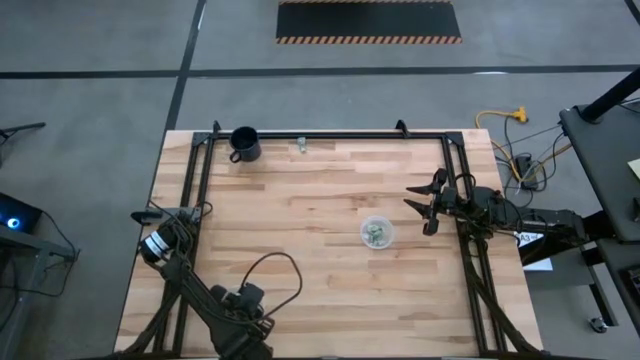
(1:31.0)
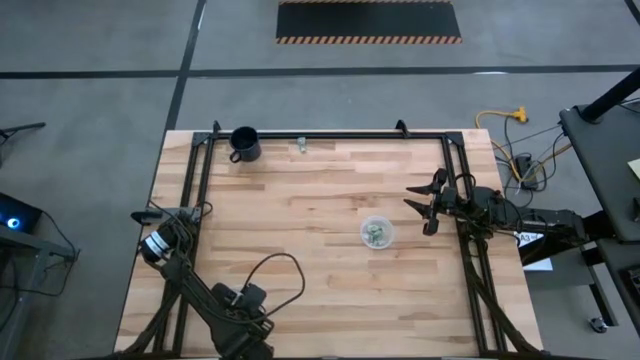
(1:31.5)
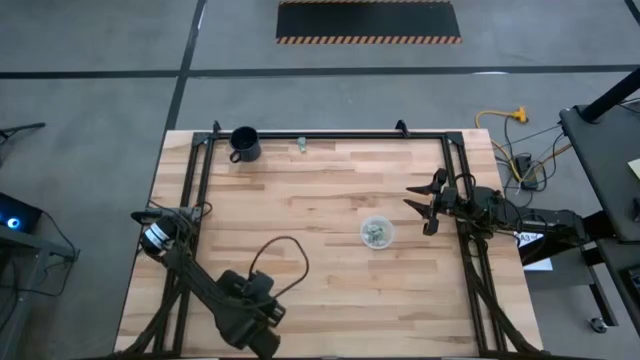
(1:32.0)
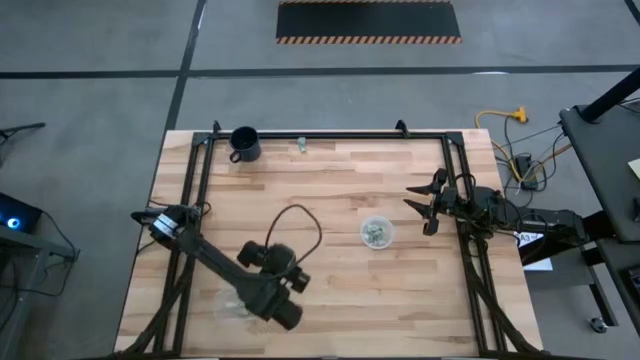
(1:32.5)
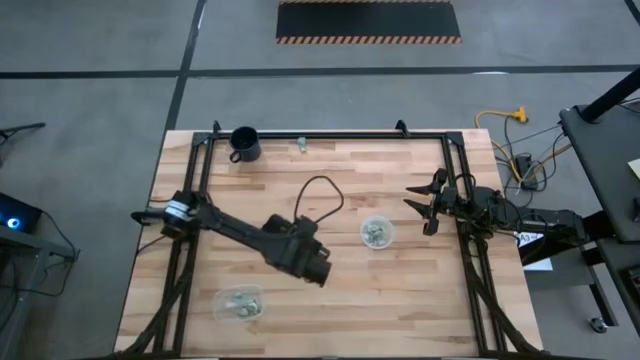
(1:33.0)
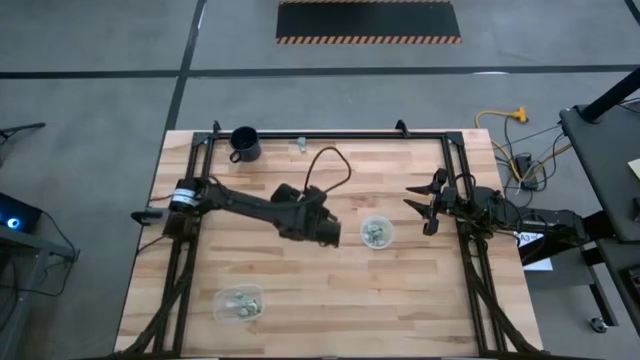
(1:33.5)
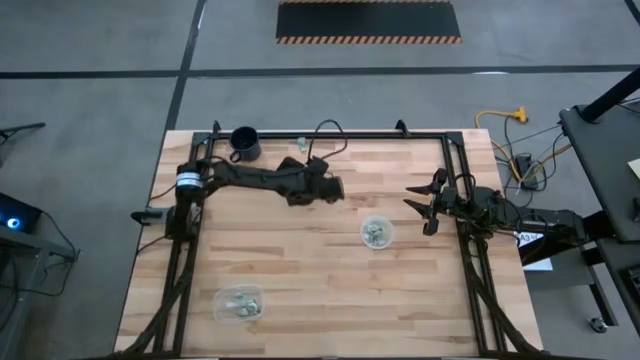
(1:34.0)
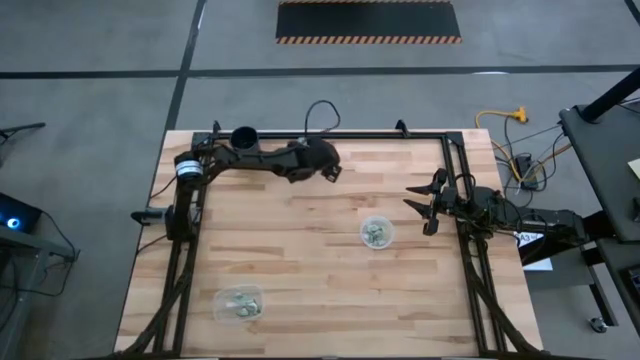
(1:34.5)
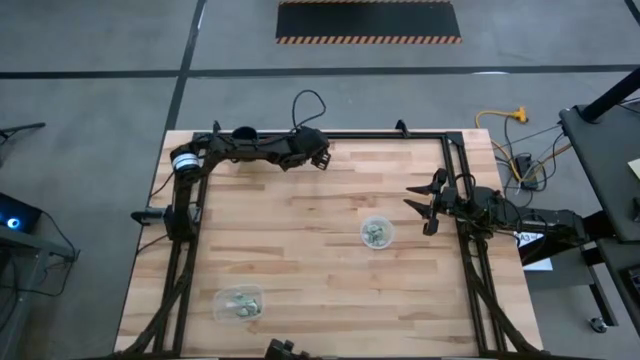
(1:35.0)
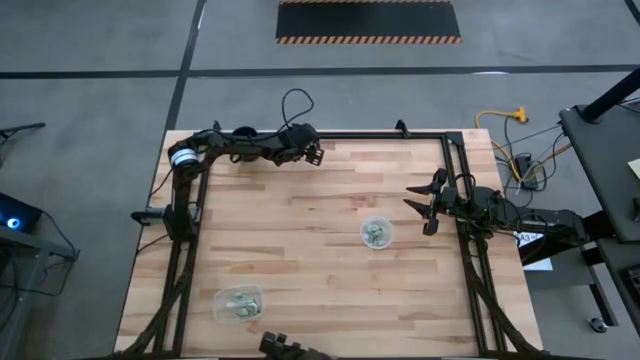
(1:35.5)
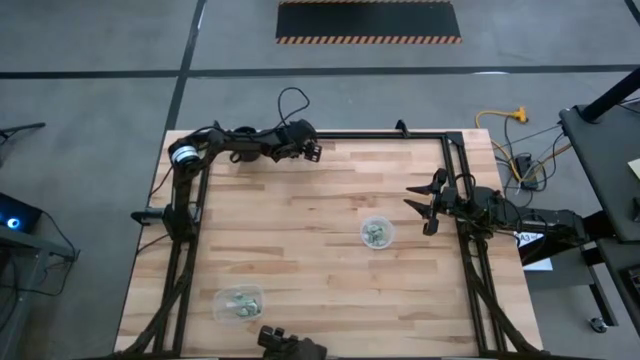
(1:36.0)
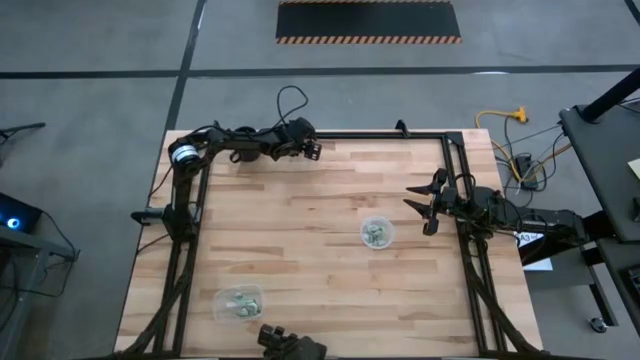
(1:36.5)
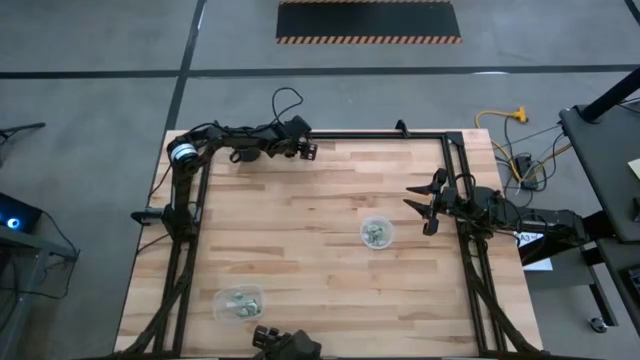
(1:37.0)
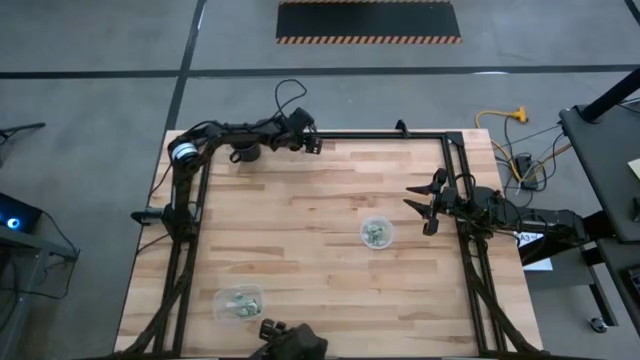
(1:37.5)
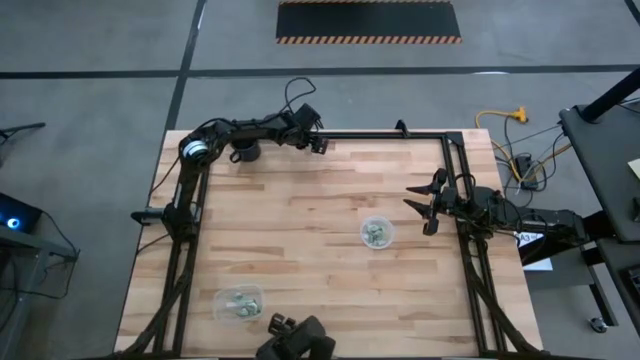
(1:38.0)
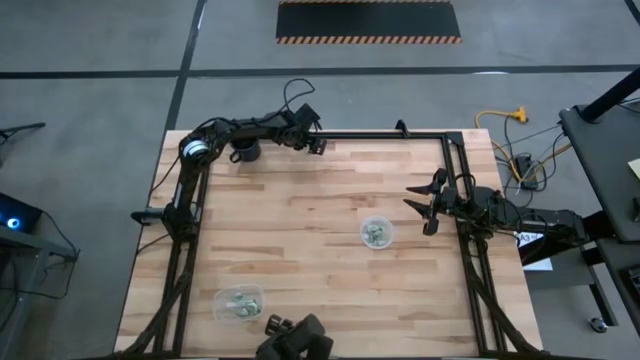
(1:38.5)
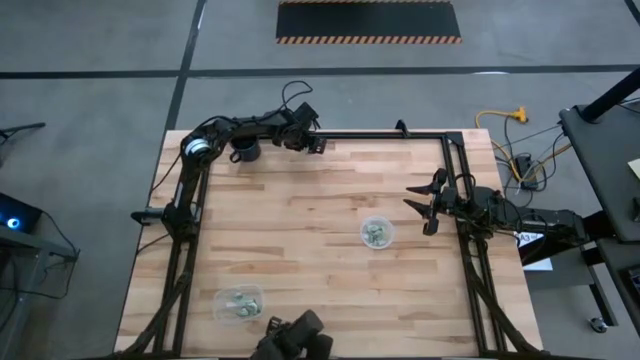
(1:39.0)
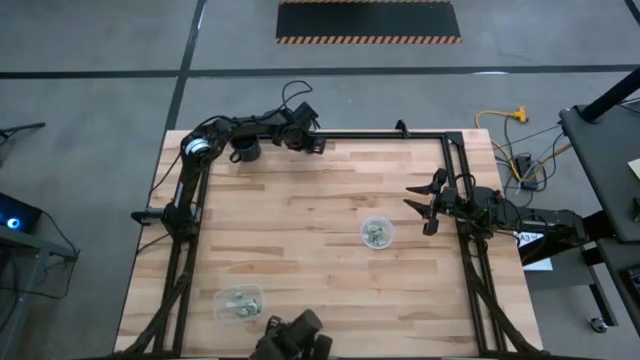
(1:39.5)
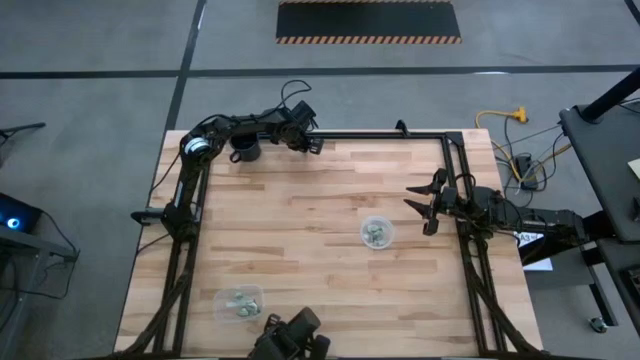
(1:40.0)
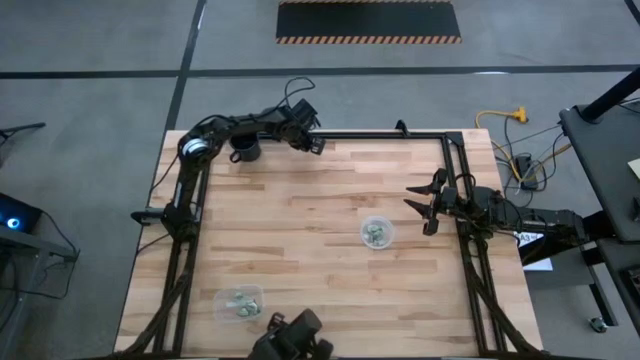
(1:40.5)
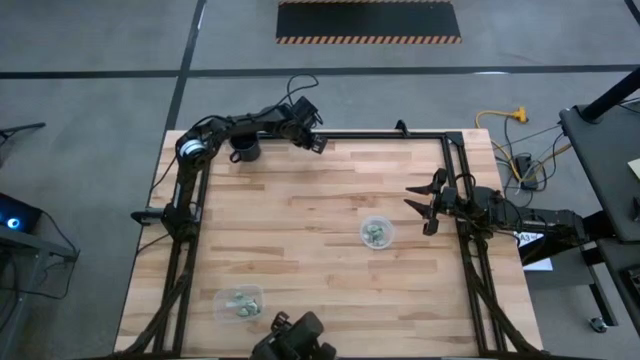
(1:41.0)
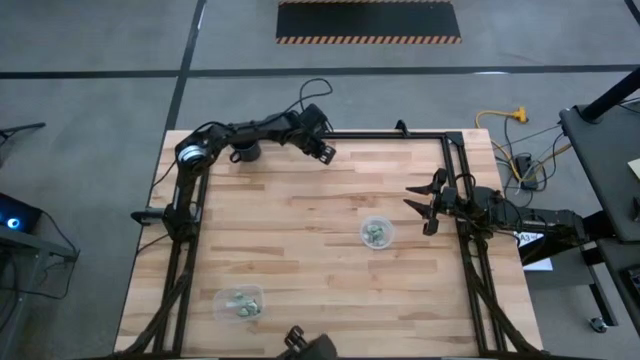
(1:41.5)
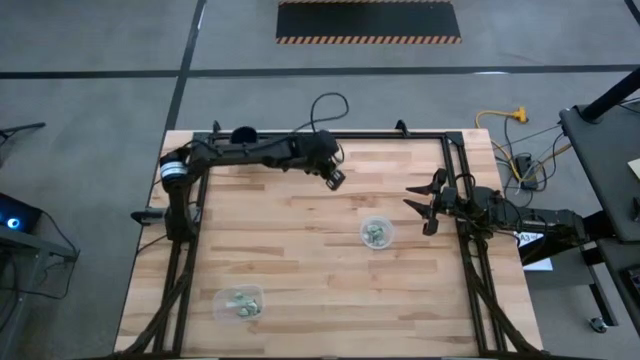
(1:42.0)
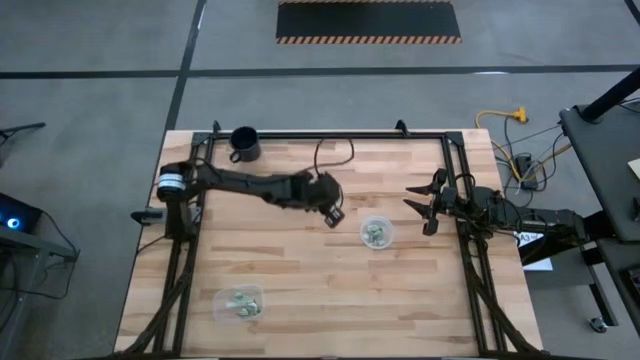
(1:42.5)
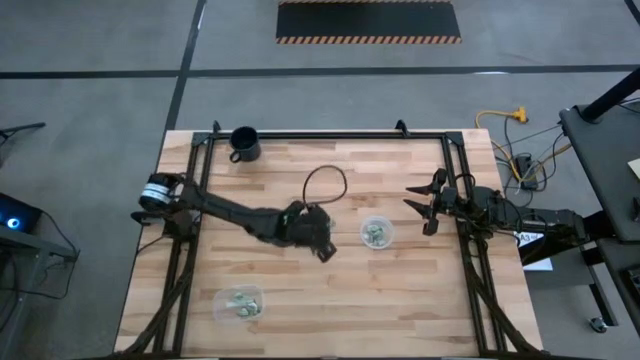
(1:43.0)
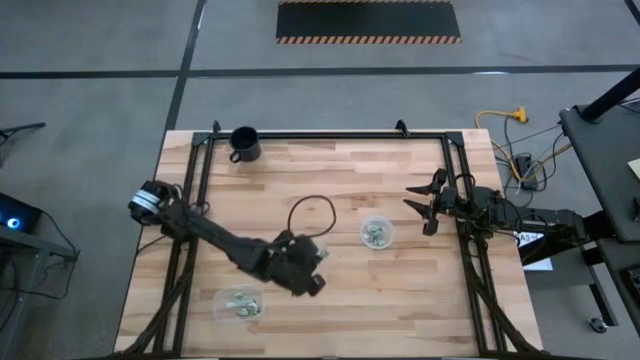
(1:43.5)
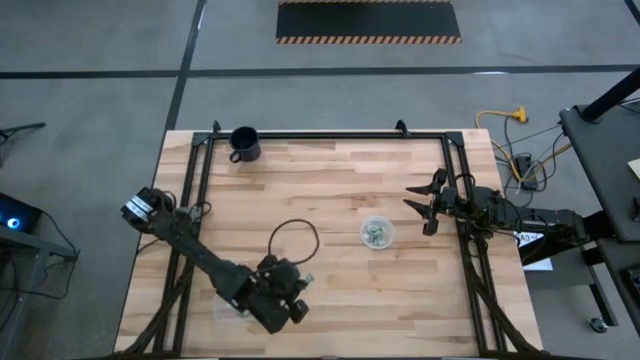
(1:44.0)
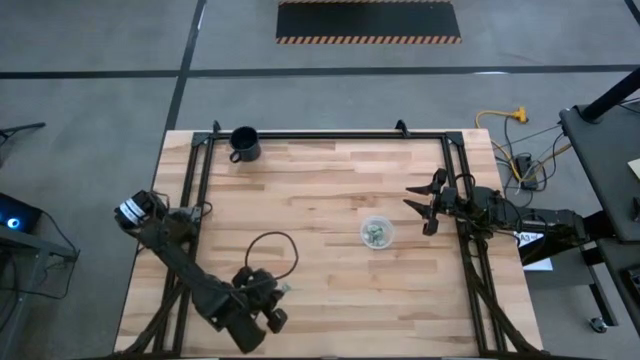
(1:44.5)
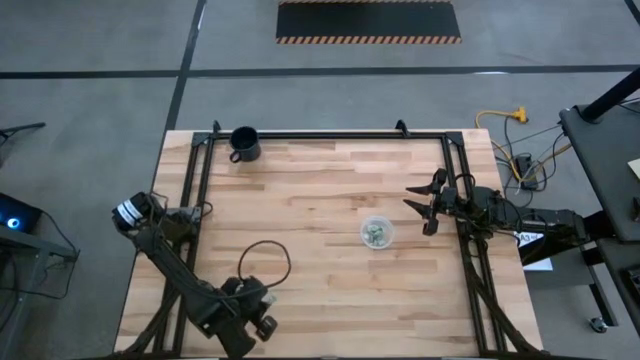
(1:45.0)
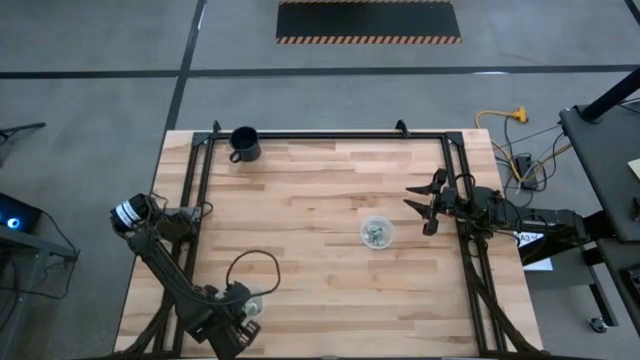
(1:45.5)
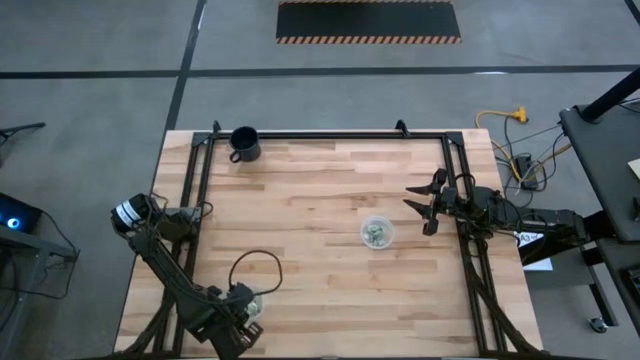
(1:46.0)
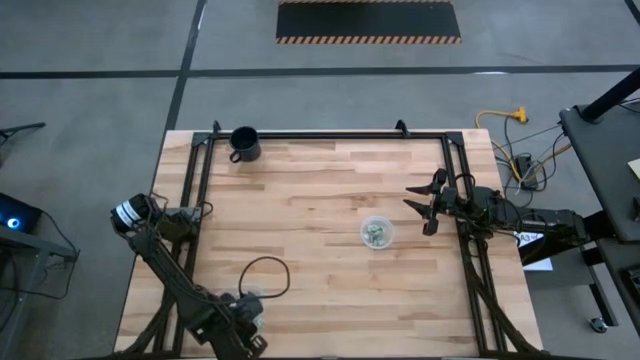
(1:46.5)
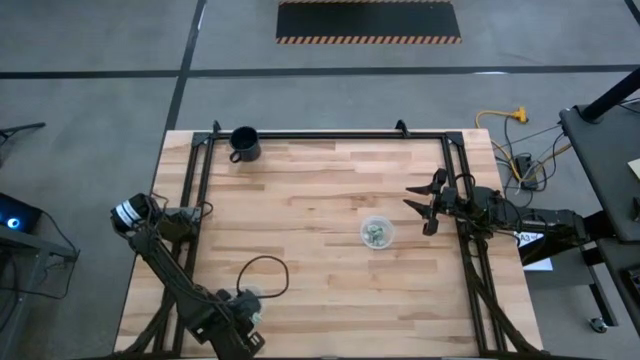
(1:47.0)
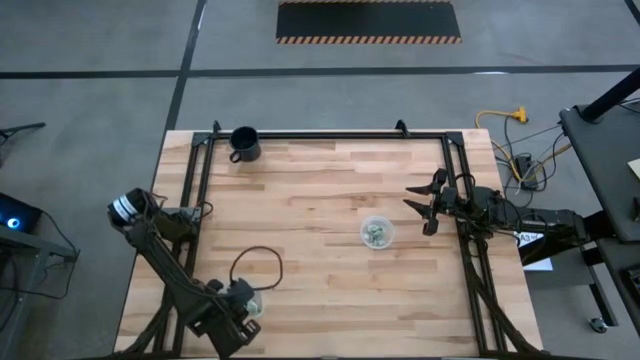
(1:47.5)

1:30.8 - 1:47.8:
Task: Pick and place Stevia / Truvia into bins
Put the white stevia packet into the left transparent container

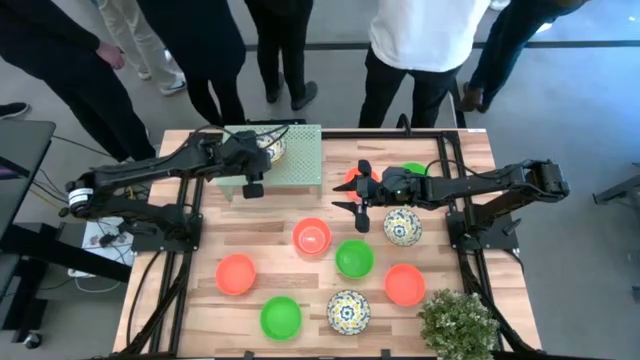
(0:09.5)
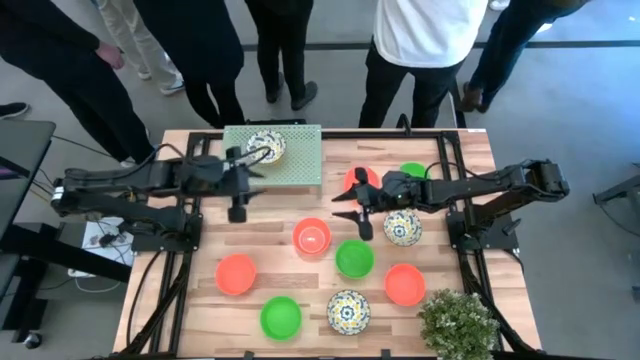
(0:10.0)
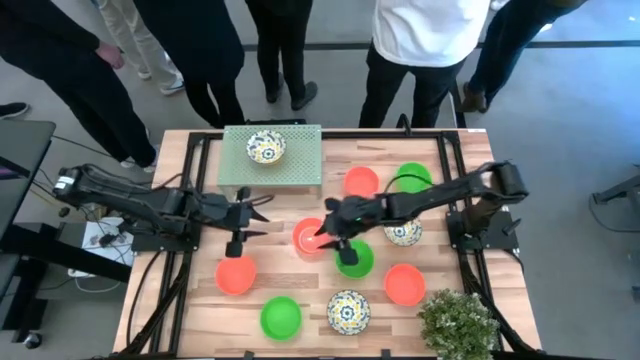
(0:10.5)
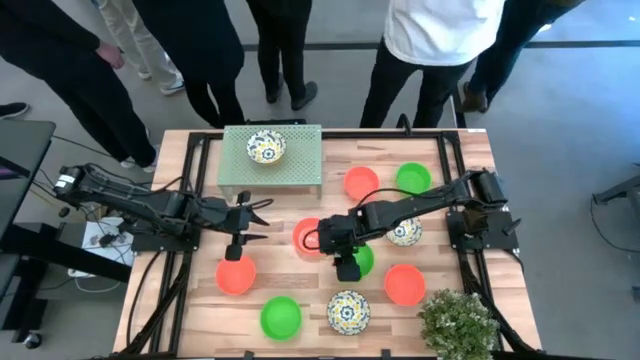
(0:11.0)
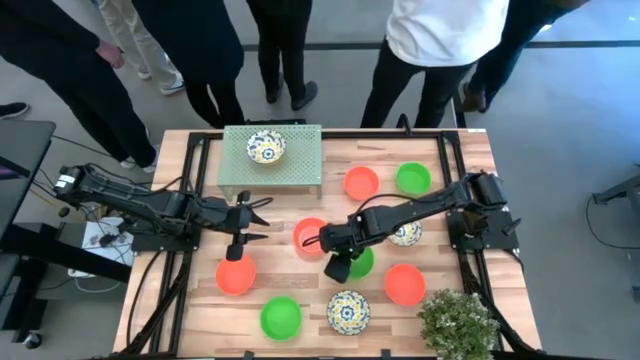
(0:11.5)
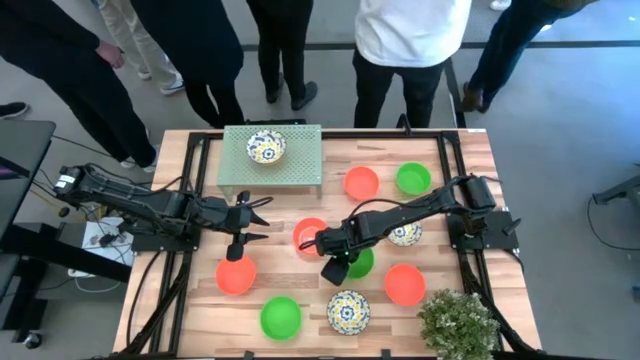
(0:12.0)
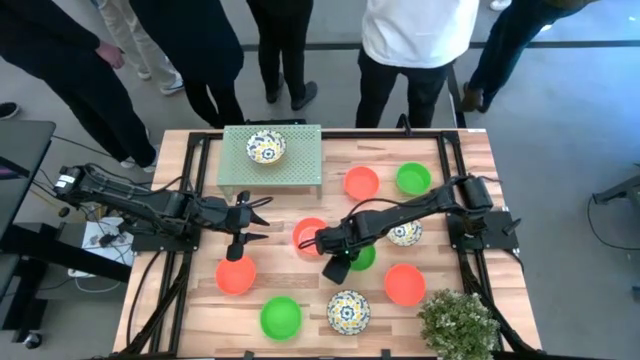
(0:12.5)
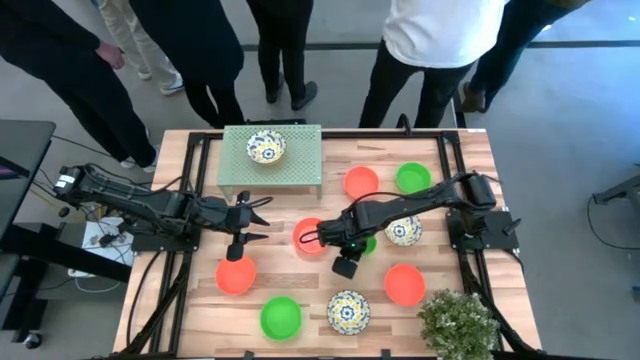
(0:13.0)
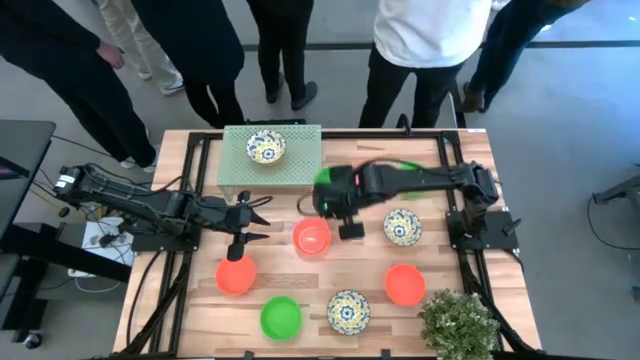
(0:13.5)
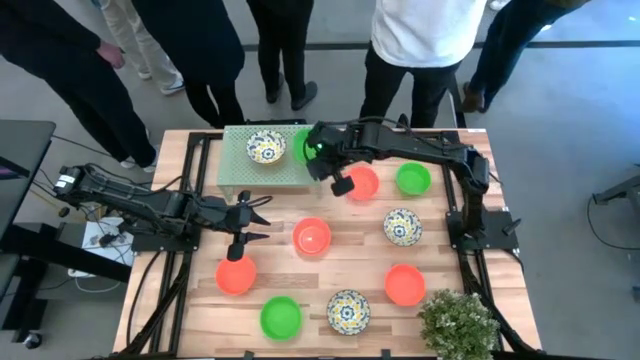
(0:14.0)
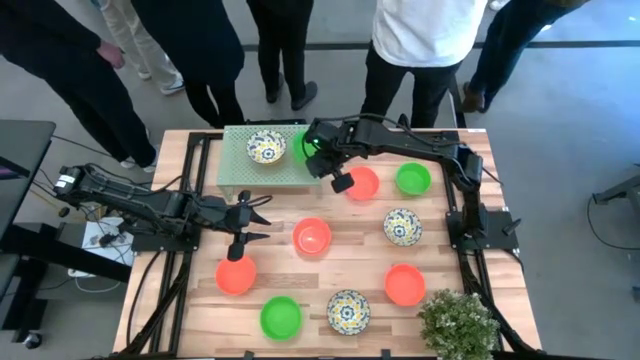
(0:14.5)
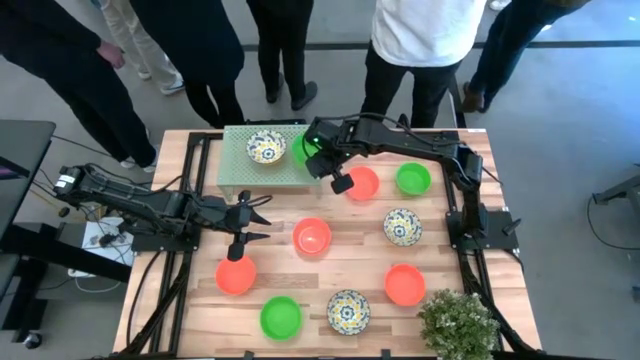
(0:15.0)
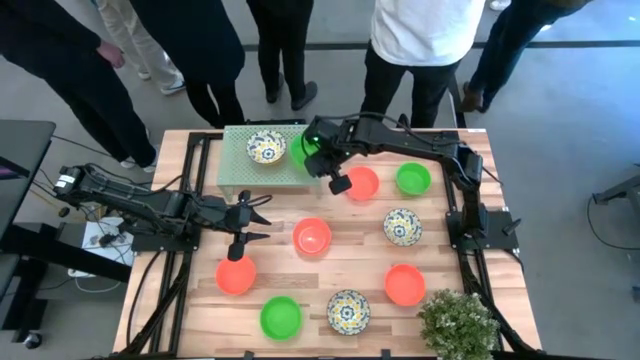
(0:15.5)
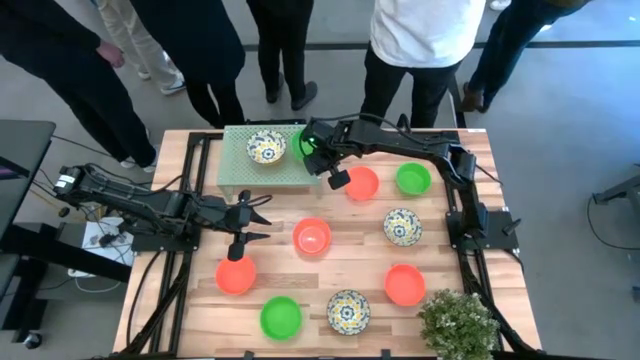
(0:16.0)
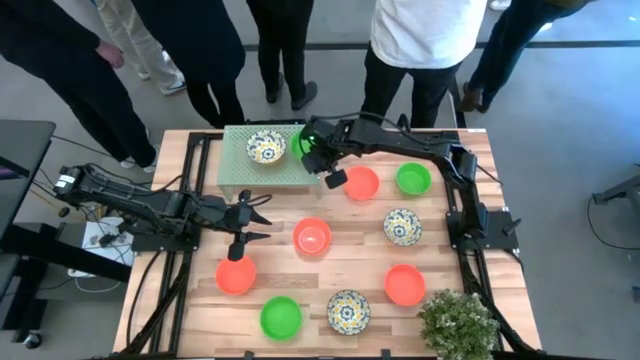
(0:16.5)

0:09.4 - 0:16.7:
Task: Pick & Place Mini bowls
Put the green bowl on the shelf
